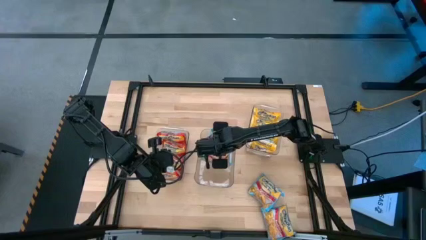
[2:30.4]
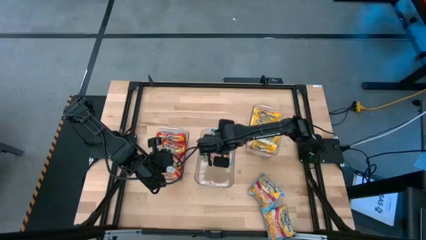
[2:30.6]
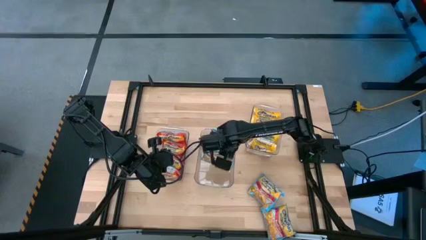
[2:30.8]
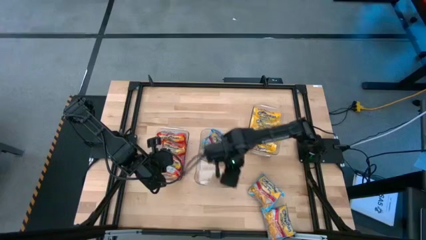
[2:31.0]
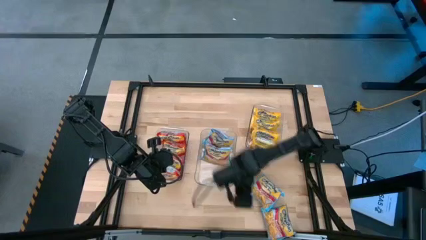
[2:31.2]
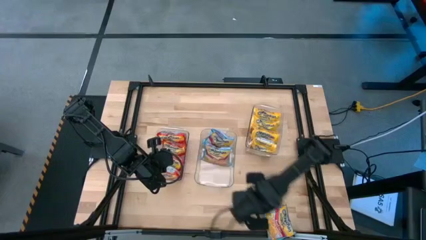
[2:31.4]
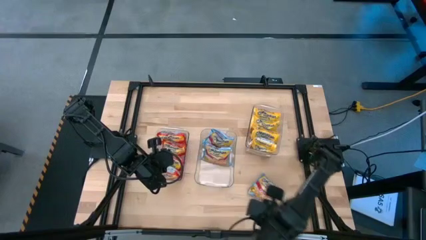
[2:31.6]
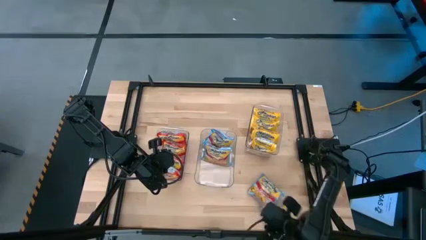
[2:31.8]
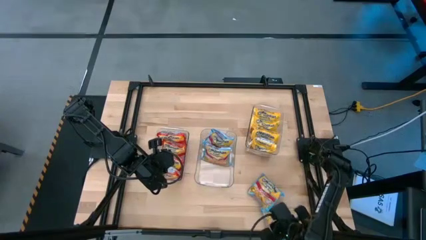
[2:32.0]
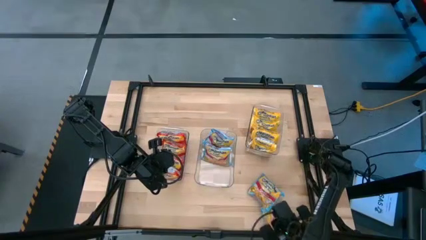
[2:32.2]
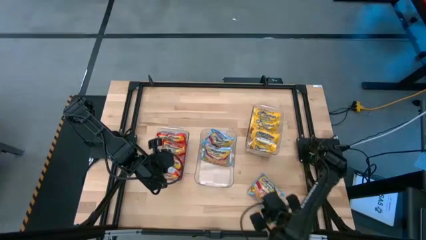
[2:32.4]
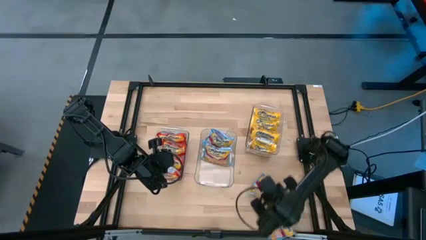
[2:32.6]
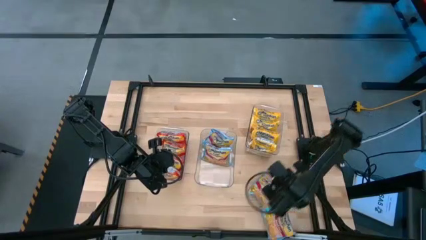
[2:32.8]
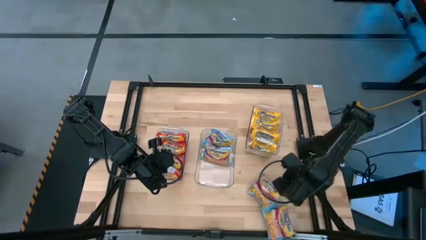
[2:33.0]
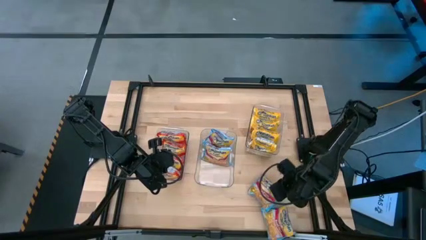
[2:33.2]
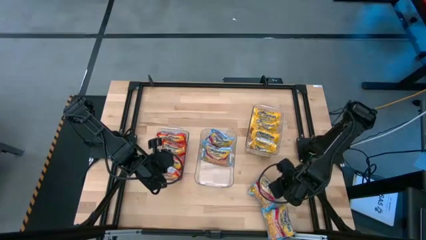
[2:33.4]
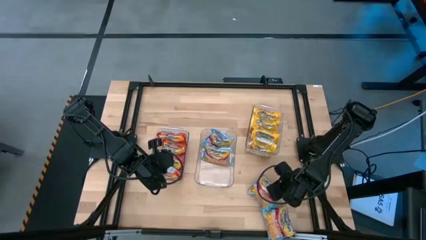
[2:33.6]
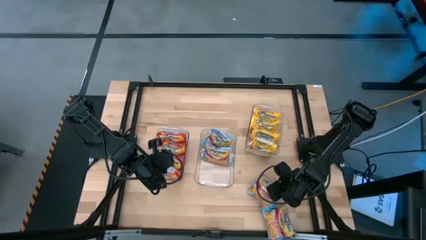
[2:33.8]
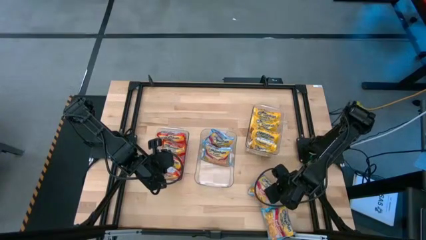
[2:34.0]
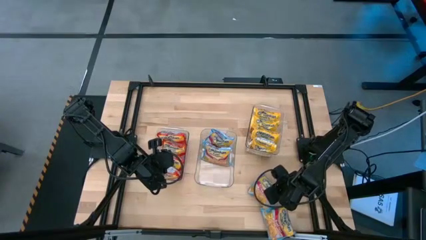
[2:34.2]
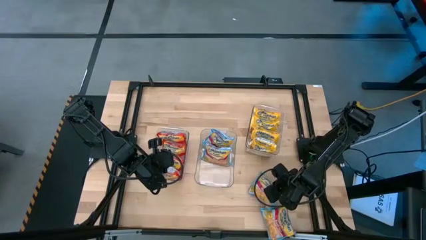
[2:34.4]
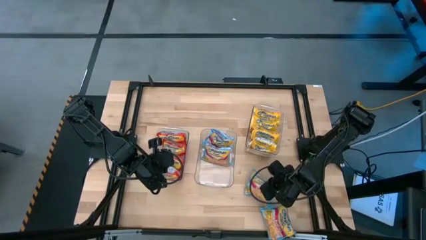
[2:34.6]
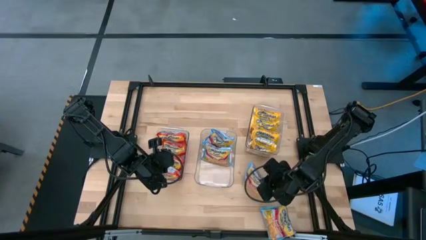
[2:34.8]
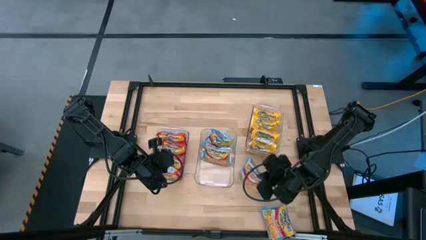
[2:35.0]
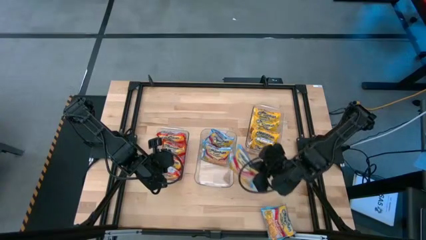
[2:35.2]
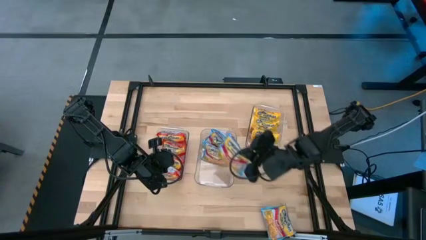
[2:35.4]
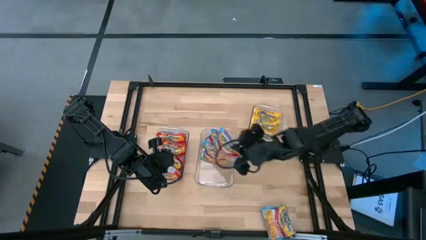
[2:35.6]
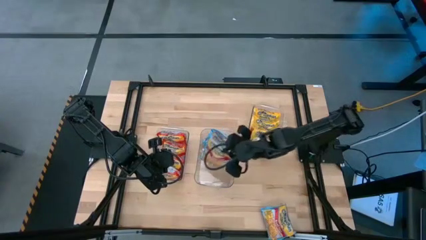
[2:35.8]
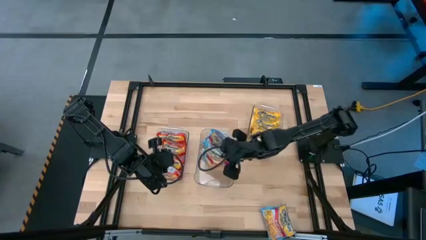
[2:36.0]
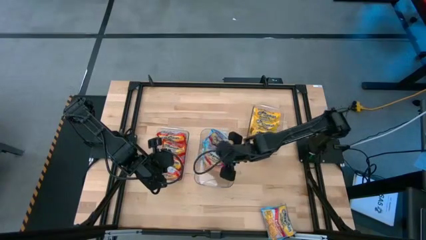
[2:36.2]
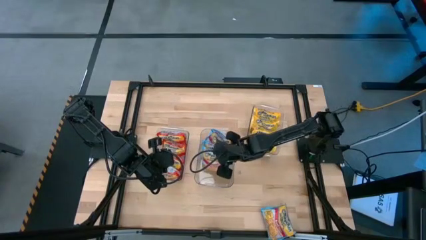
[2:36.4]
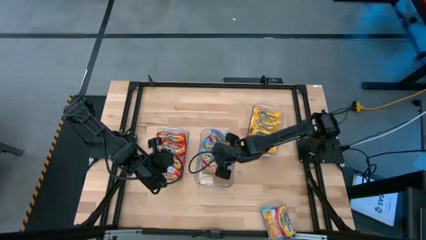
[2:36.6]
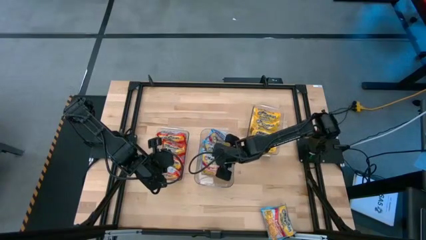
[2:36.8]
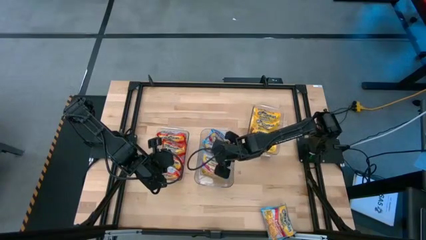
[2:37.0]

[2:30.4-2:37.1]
Task: Sort Maruchan noodles
Put the blue noodle pack into the middle transparent bin

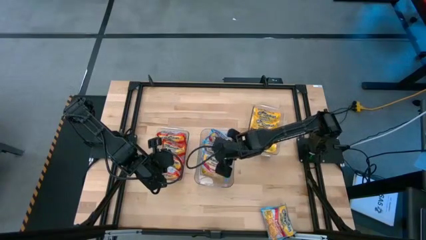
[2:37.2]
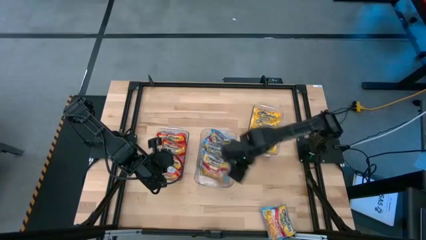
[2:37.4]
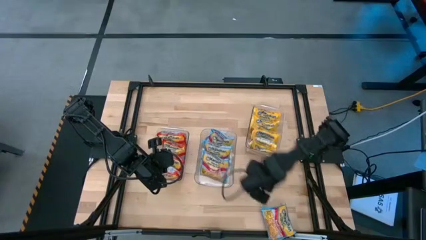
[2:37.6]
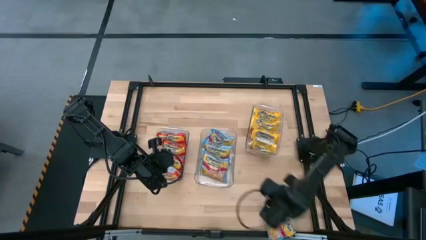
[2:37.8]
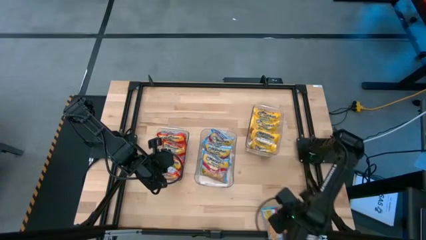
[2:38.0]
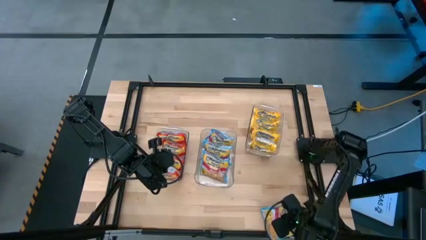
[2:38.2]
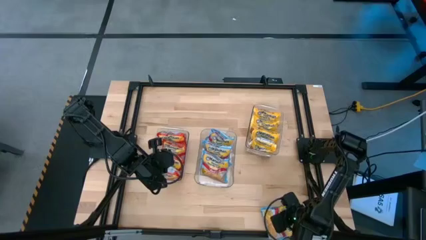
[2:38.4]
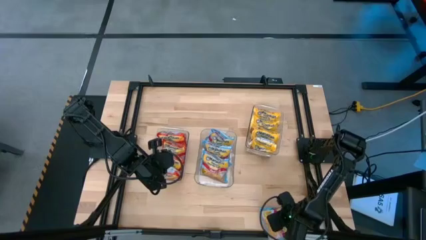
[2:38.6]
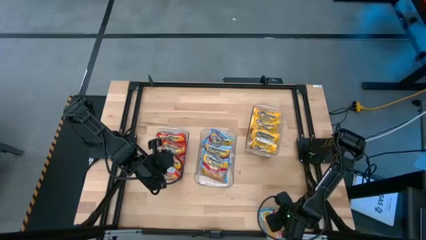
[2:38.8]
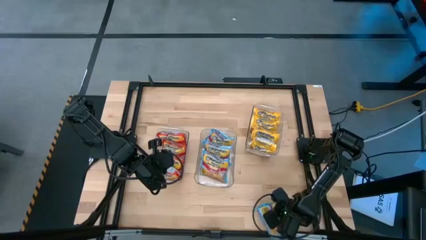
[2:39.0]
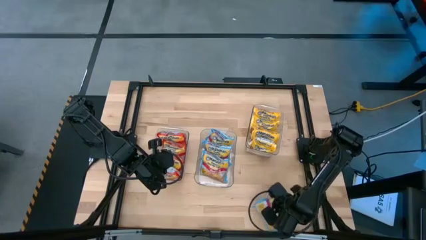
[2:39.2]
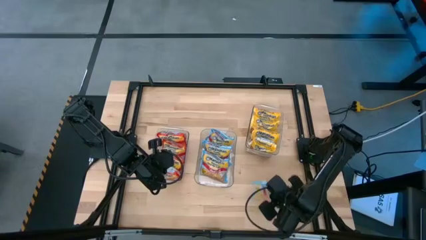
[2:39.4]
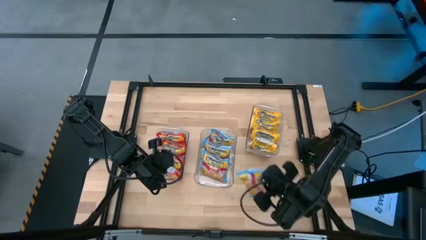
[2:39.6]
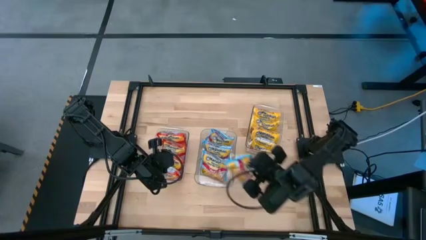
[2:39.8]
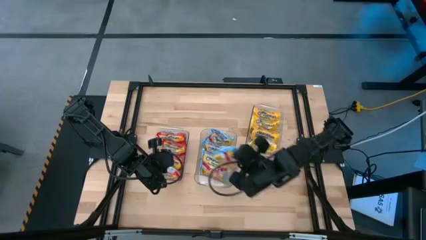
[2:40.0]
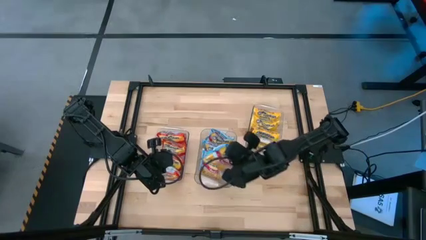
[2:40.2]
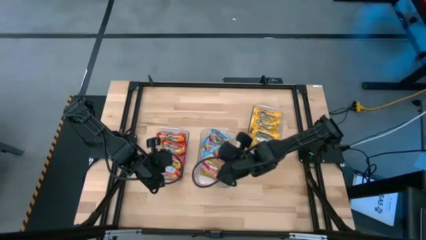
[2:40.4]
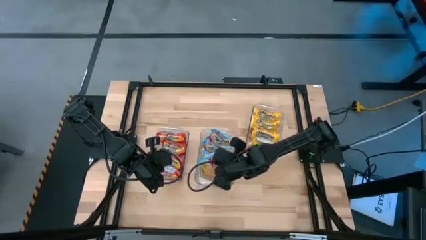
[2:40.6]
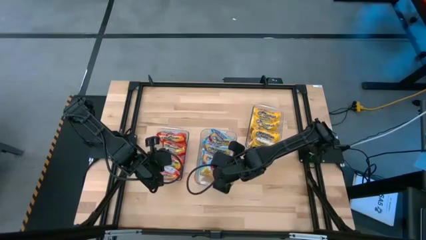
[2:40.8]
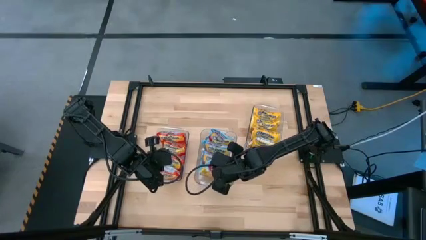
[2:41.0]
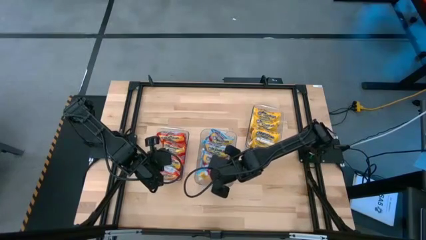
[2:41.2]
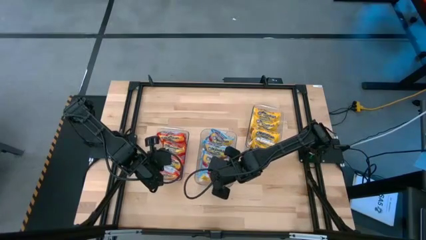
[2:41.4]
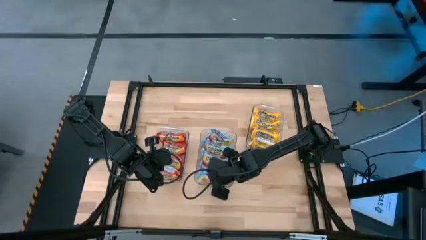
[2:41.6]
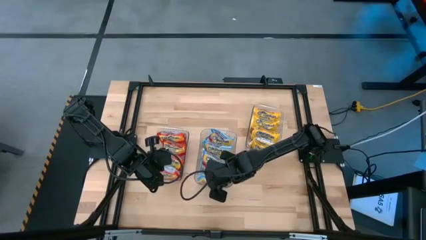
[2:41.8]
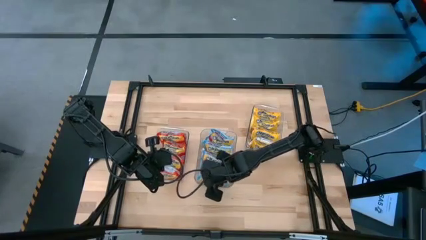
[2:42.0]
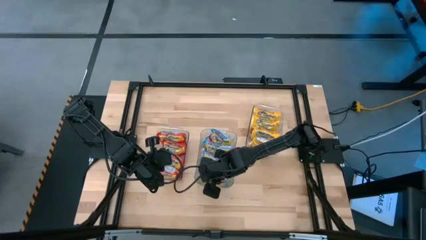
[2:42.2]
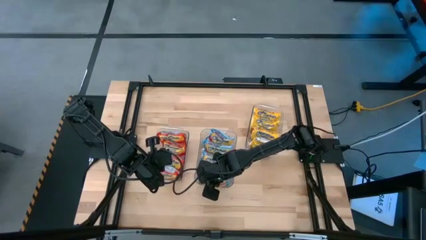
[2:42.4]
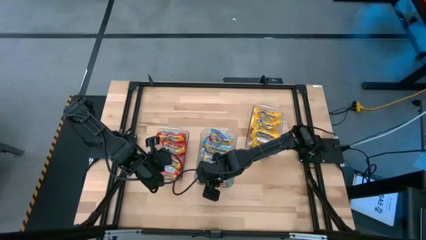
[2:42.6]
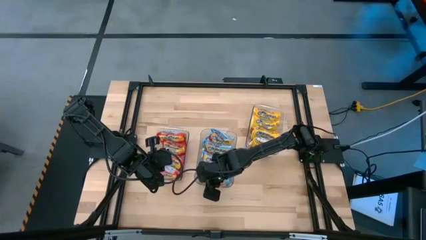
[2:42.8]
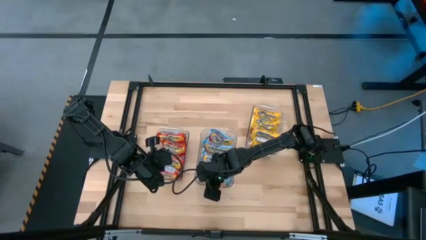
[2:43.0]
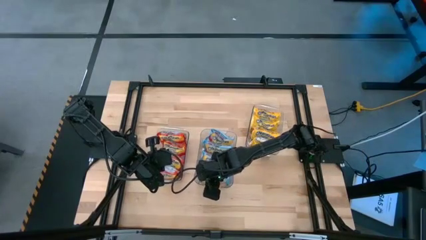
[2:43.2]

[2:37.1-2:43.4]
Put the blue noodle pack into the middle transparent bin

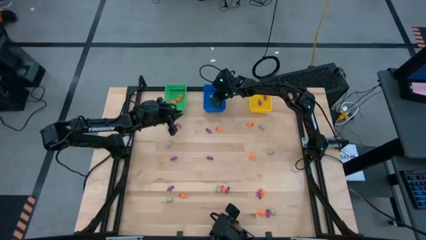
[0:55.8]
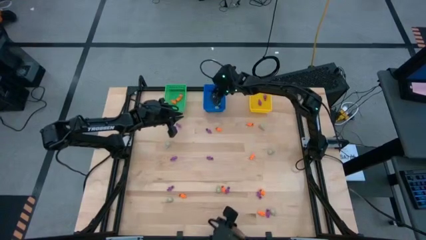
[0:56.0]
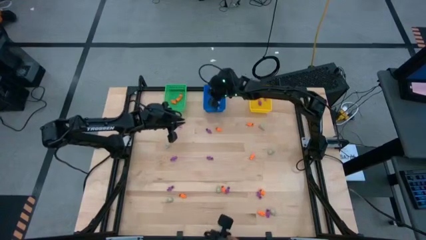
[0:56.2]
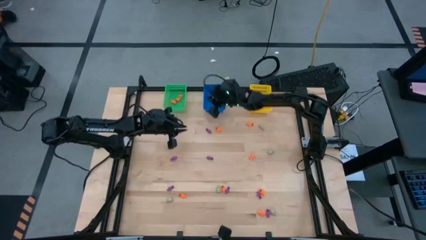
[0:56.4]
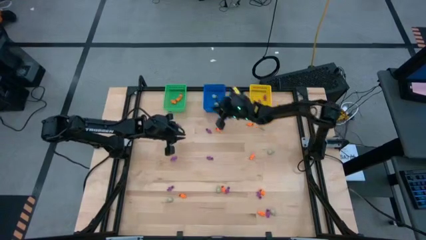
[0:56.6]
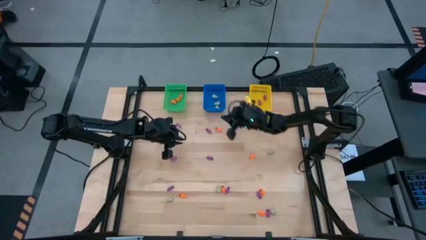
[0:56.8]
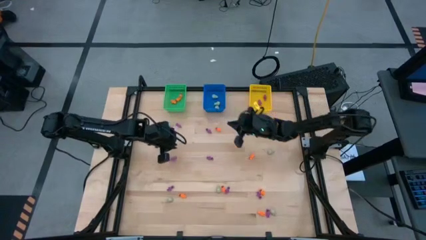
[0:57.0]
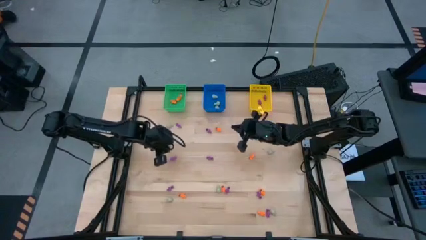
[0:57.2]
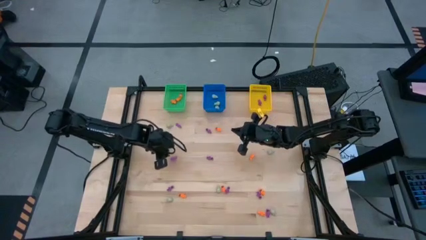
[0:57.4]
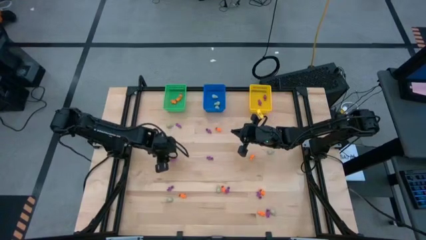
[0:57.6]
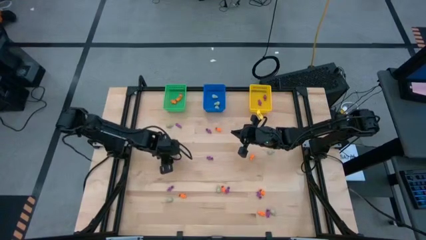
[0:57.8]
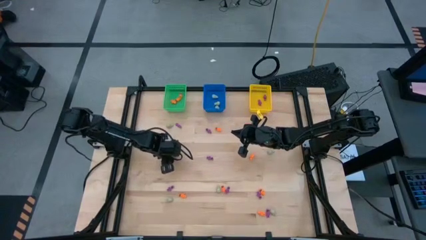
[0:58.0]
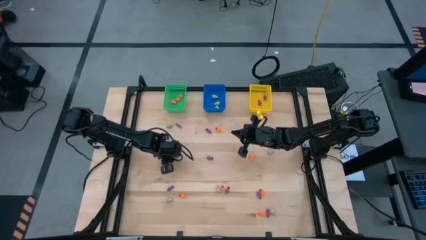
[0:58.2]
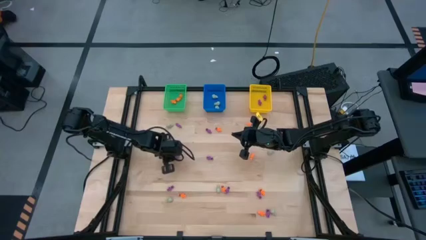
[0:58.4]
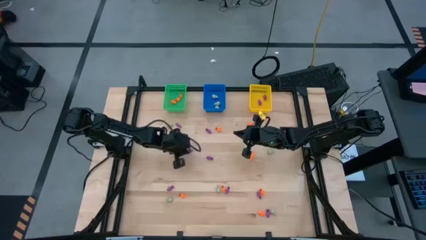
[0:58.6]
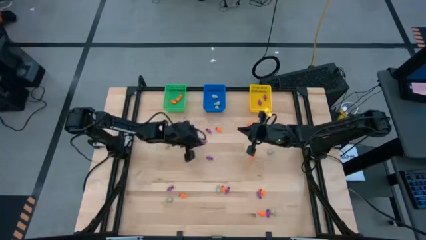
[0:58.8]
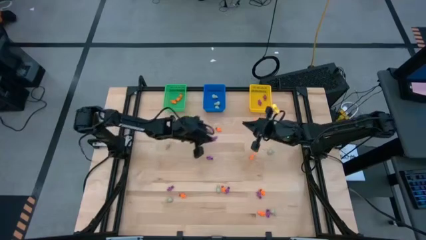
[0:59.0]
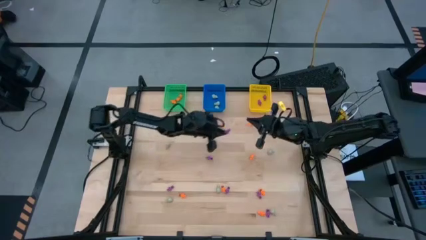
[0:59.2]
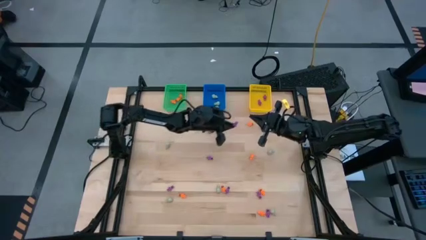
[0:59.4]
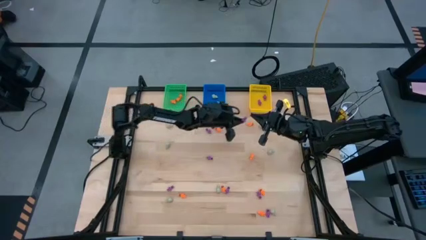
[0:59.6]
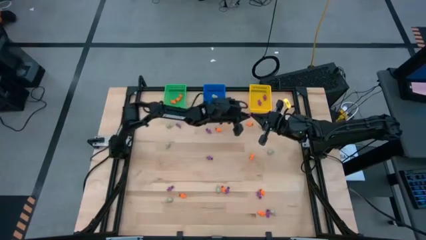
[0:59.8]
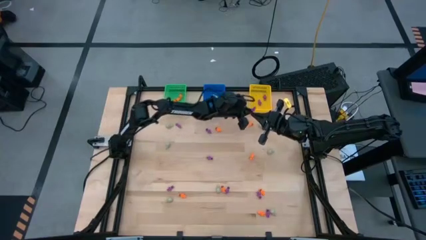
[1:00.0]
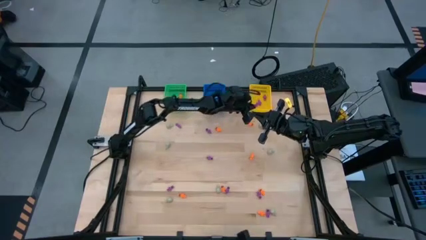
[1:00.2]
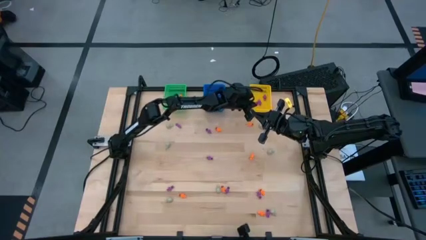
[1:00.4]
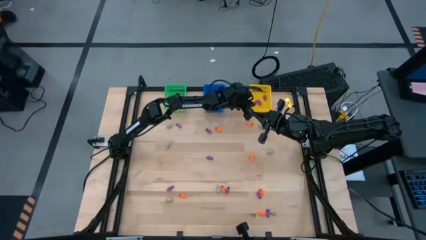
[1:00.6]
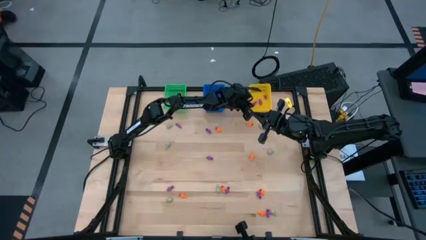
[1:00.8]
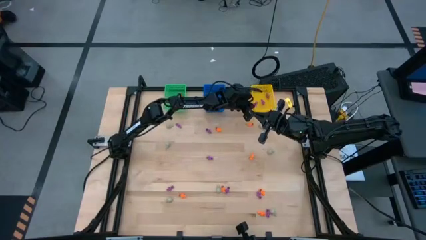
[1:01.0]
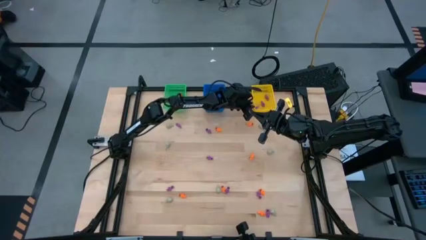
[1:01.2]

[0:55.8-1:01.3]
Task: Sort Halloween decoration
Put the purple skeleton toy into the yellow bin
